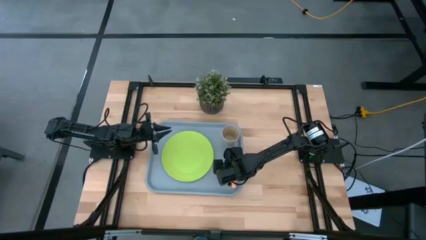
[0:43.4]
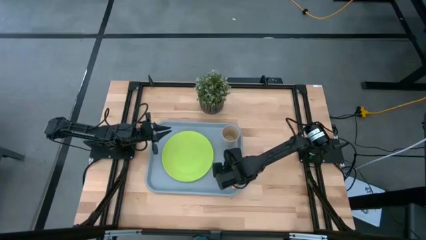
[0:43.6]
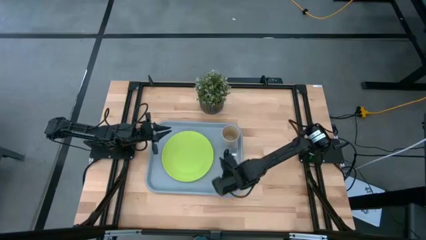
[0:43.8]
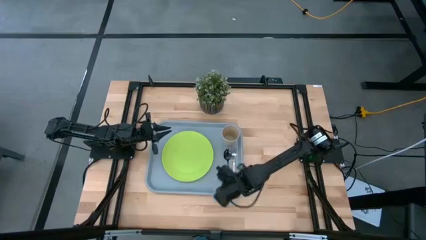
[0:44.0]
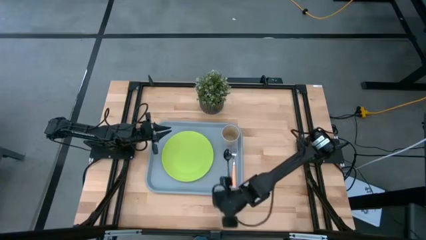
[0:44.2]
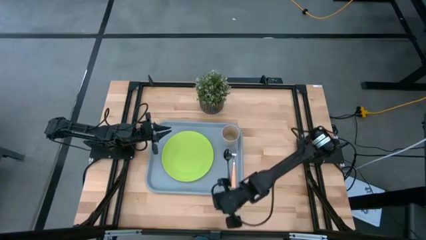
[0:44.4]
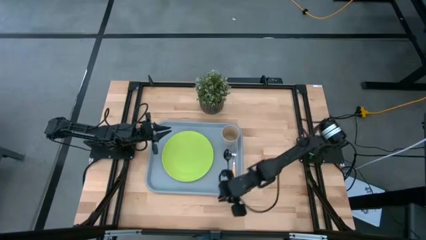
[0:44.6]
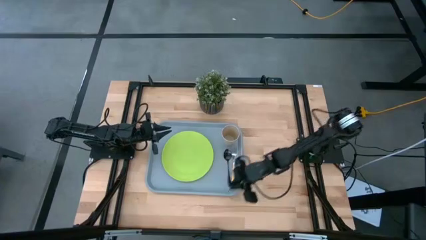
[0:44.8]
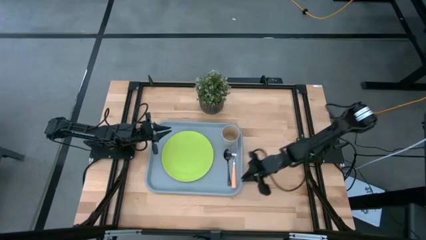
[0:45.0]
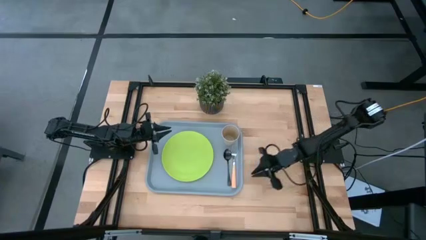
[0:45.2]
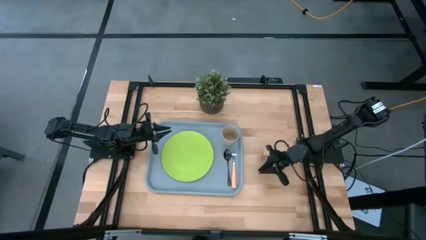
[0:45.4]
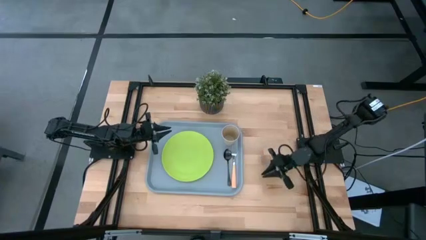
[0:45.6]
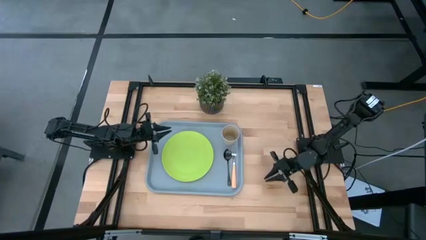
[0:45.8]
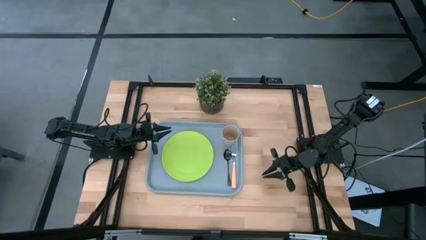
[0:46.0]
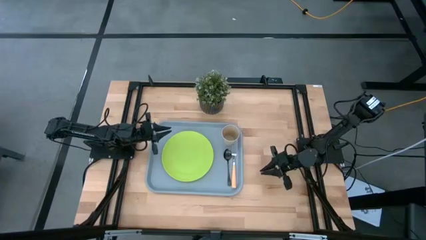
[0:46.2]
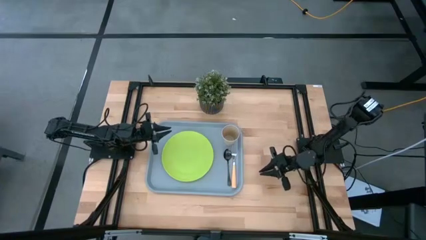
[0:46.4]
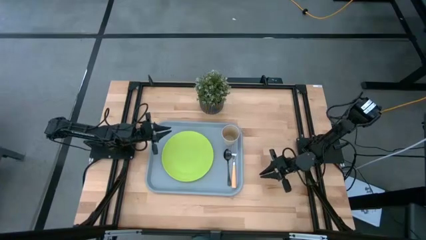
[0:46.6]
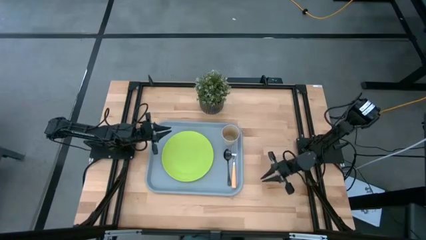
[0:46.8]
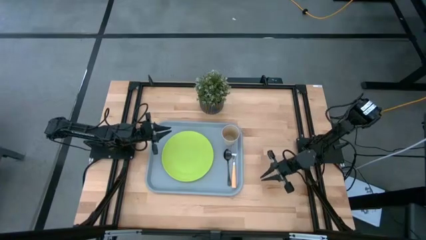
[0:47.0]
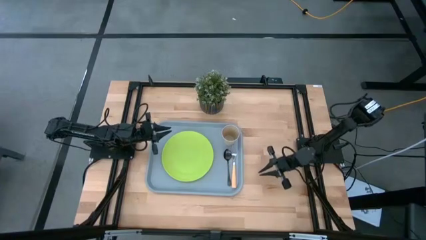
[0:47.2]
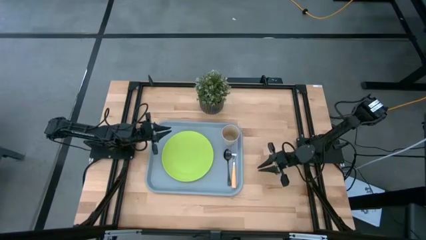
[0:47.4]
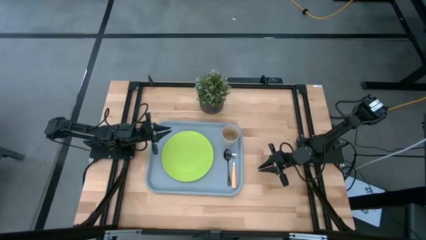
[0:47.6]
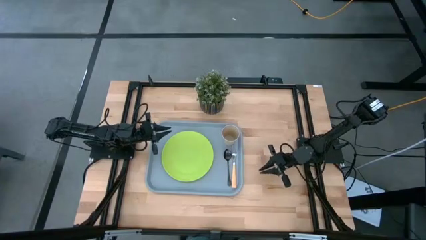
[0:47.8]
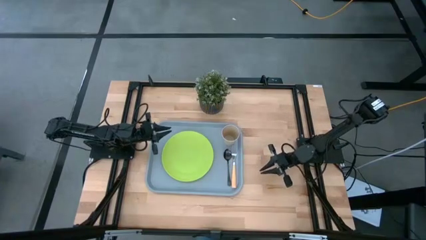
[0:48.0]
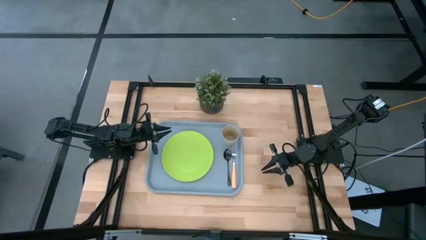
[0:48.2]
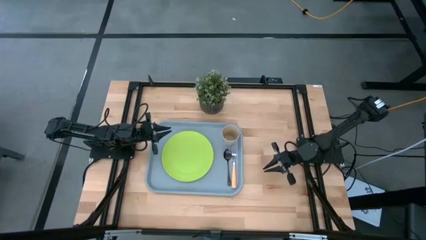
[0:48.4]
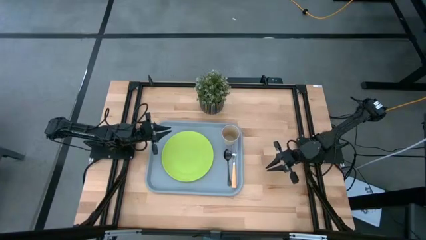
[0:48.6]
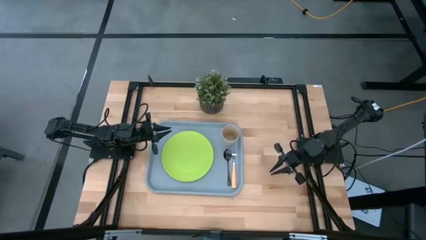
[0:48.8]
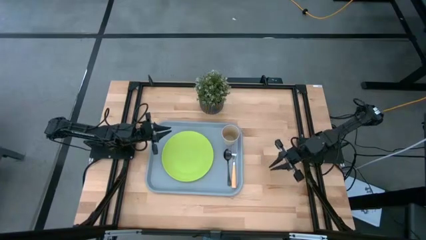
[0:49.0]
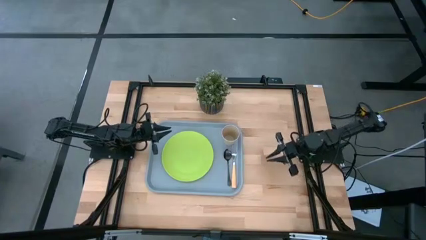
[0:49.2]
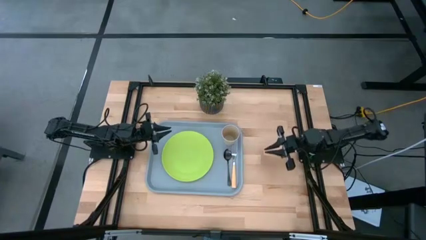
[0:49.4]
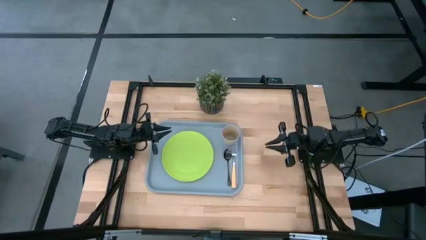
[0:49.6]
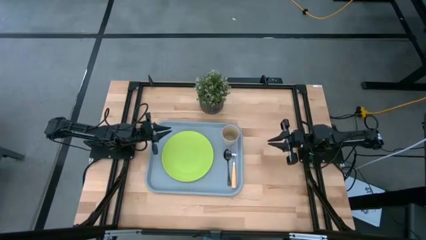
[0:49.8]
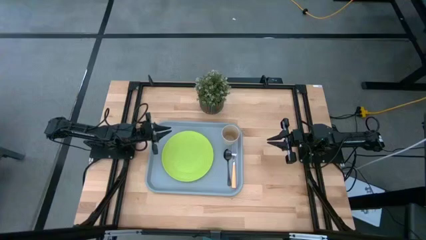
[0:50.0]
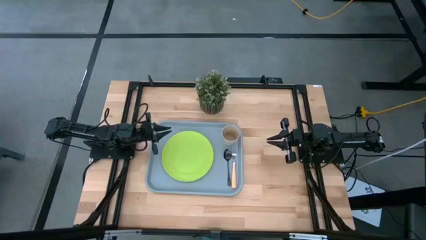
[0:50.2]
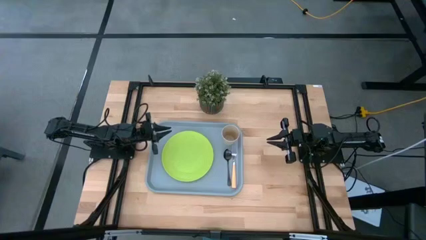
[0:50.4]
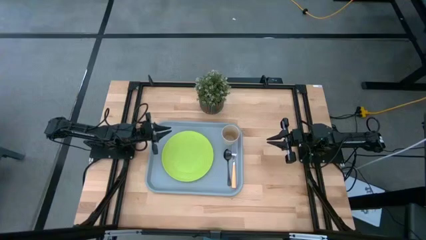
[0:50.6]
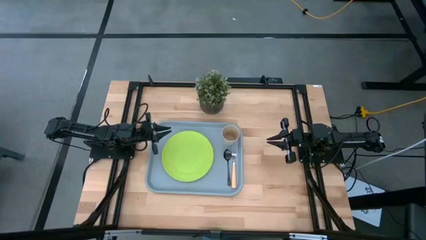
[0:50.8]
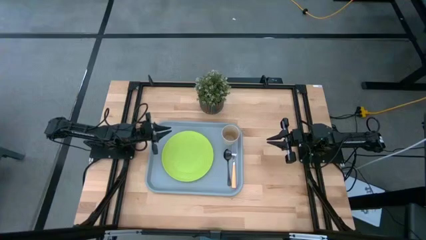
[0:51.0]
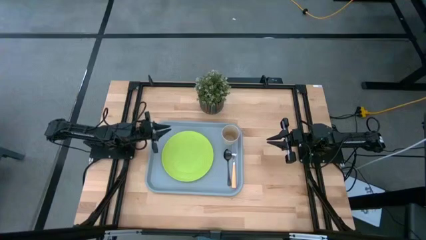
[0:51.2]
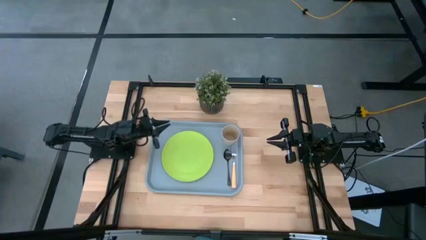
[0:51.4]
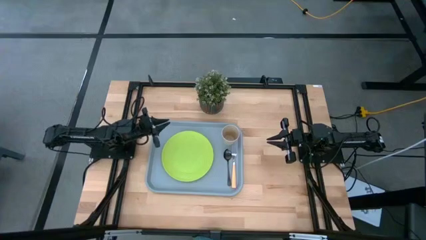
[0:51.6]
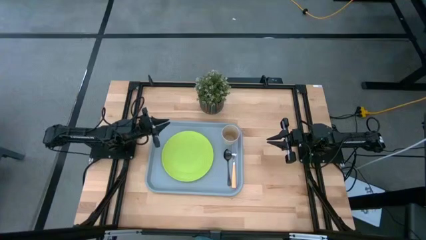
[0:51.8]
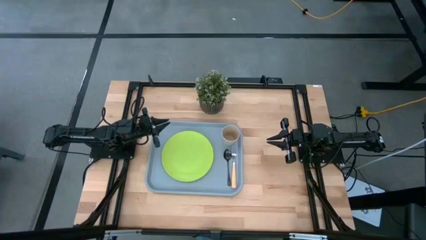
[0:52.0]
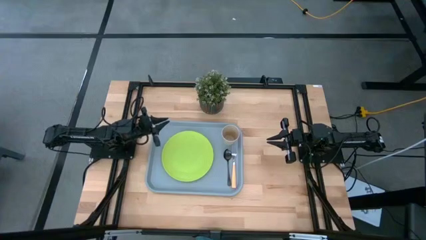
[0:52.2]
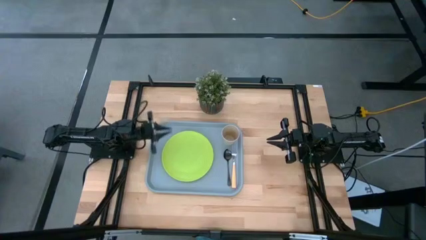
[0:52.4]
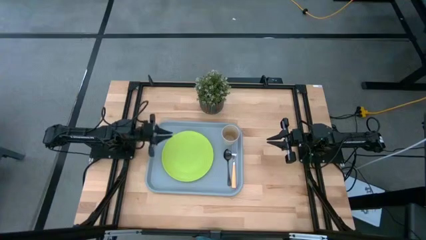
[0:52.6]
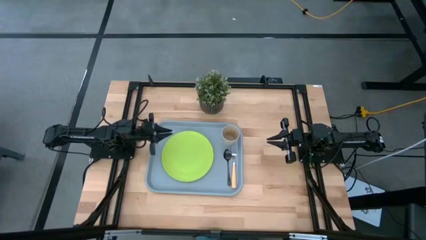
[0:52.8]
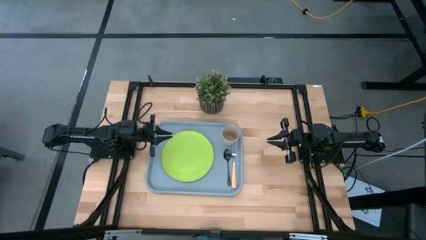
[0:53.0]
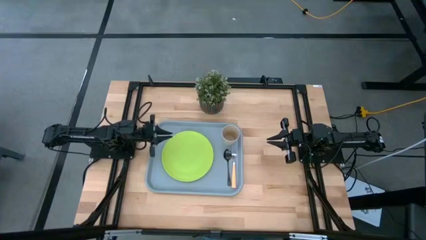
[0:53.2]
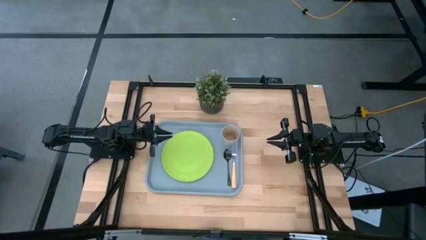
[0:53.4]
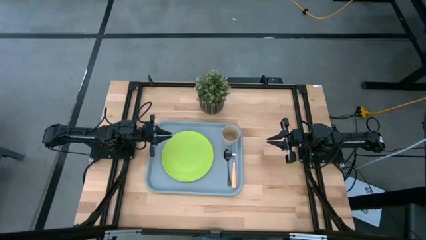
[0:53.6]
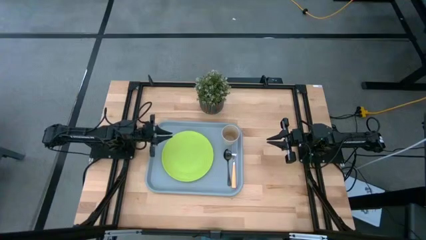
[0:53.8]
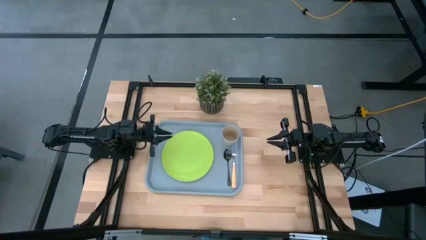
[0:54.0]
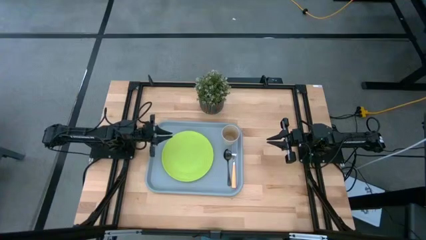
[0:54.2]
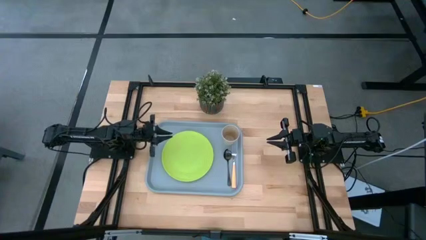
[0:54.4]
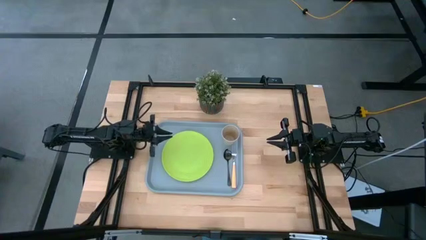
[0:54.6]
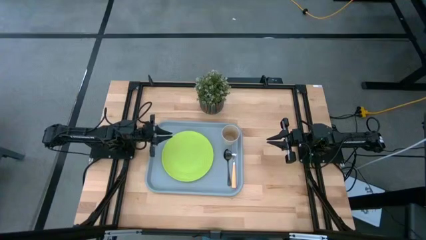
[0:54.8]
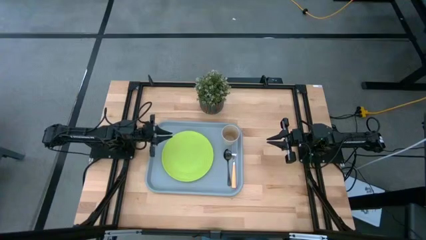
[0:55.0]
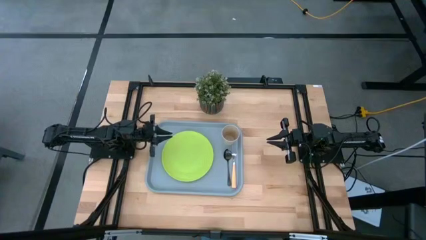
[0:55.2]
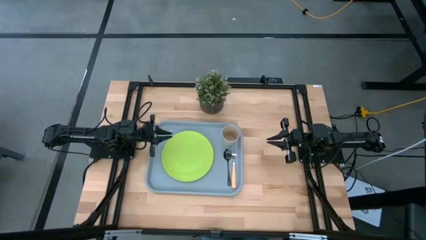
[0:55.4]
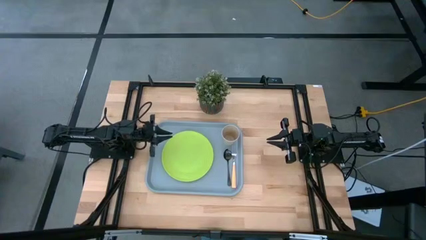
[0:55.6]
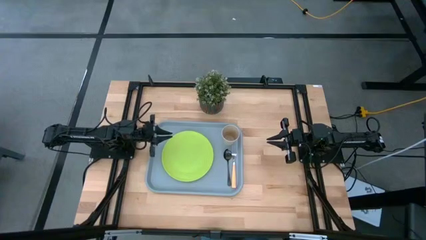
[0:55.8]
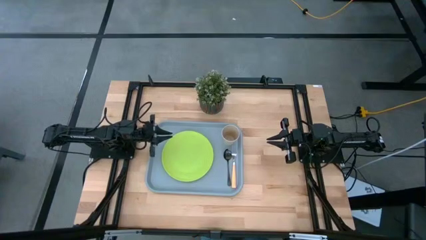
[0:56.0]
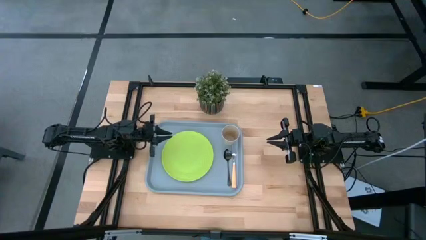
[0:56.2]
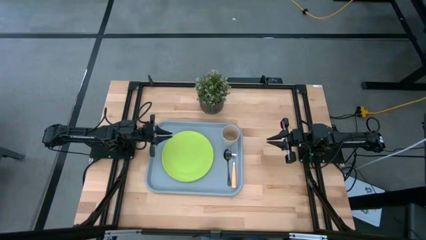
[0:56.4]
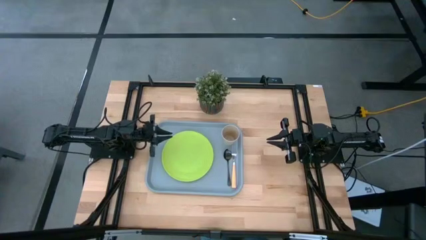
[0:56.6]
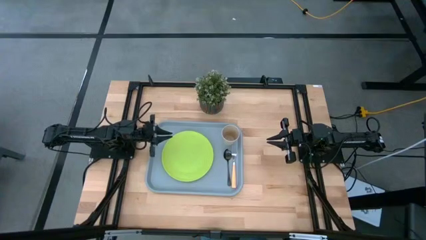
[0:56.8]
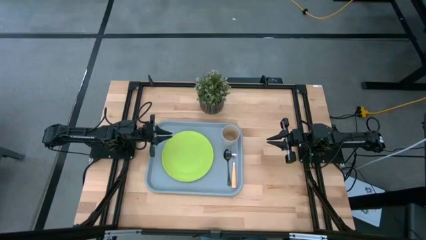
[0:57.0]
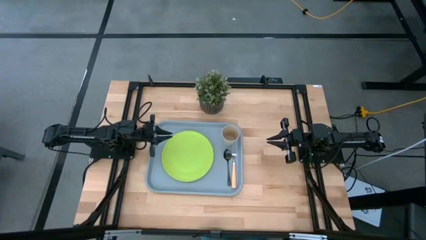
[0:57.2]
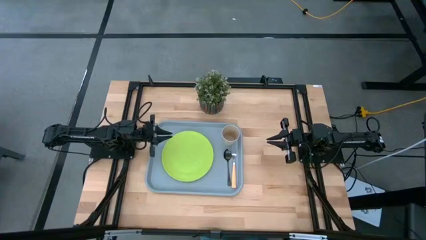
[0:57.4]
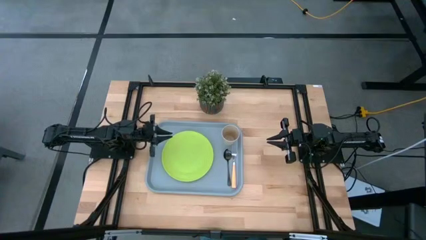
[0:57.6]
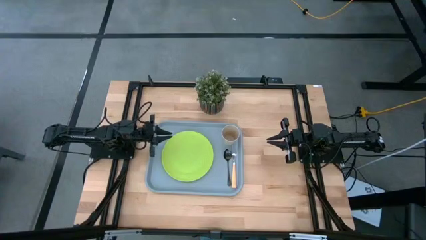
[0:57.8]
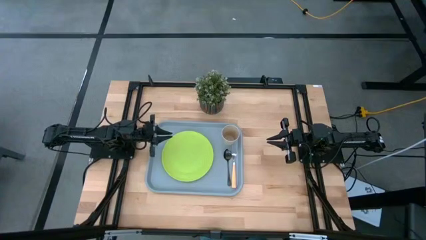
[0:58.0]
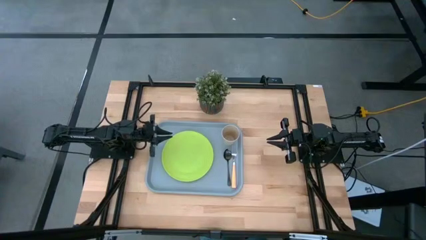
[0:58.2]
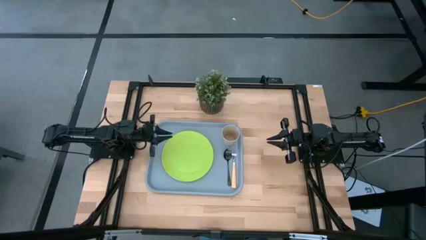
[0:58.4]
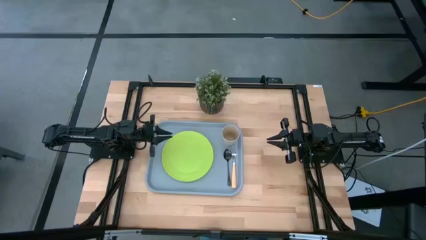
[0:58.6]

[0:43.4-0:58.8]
Task: Pick and place plate/cup/fork/spoon on tray
Return to Home Position
